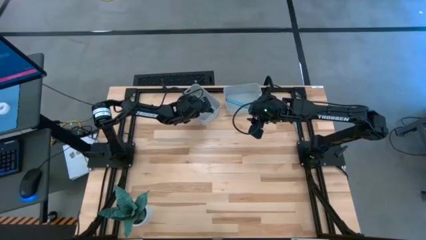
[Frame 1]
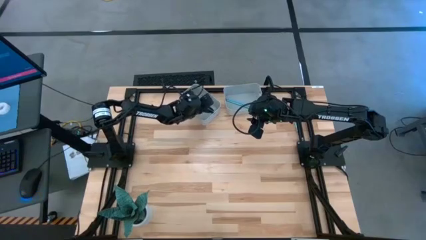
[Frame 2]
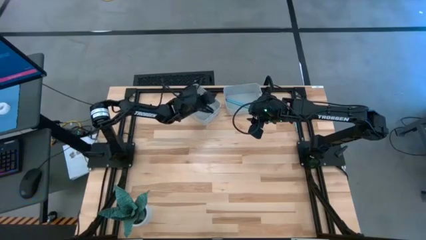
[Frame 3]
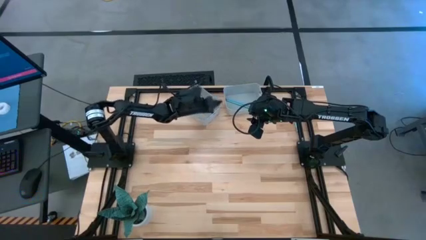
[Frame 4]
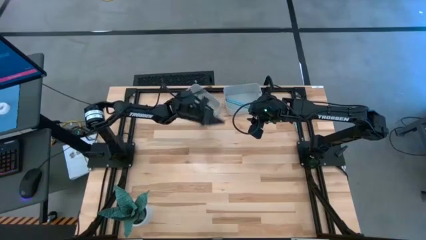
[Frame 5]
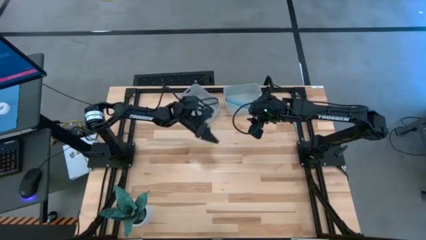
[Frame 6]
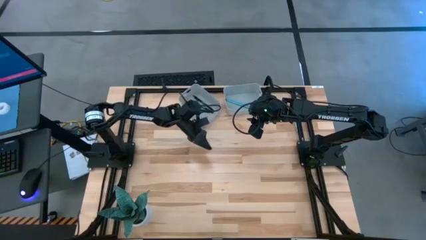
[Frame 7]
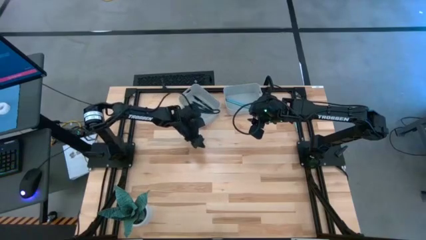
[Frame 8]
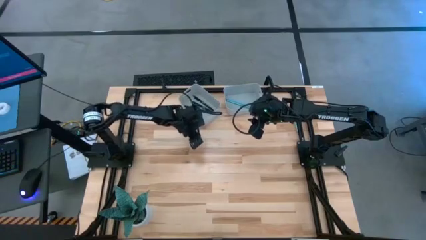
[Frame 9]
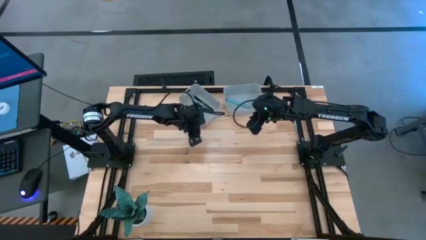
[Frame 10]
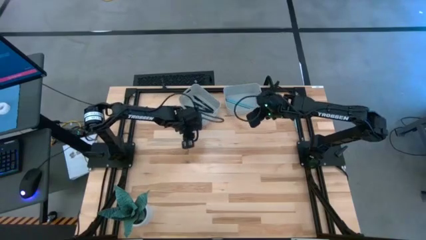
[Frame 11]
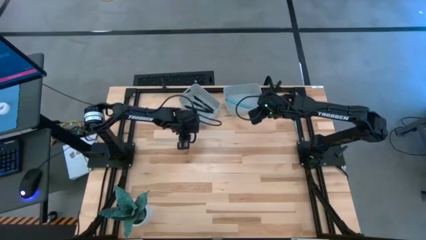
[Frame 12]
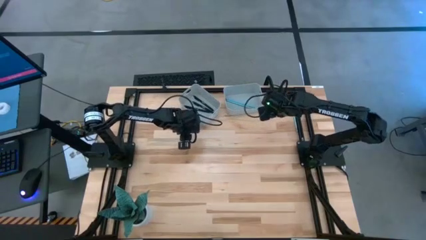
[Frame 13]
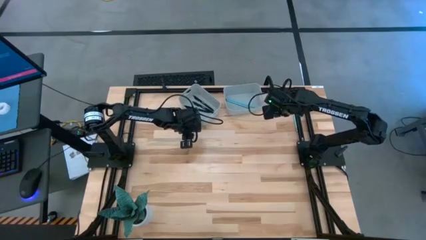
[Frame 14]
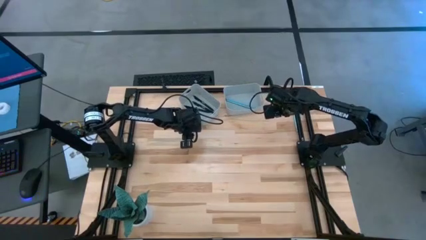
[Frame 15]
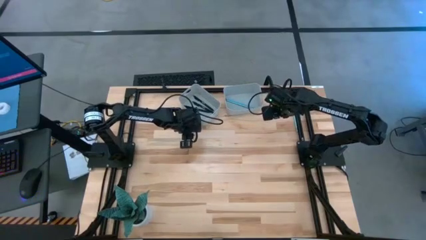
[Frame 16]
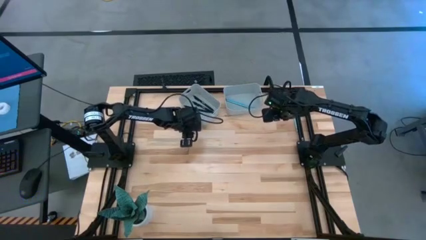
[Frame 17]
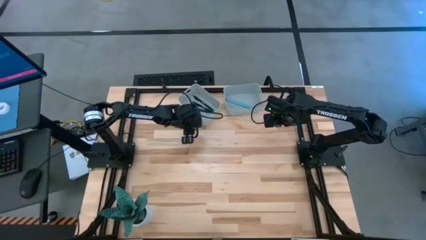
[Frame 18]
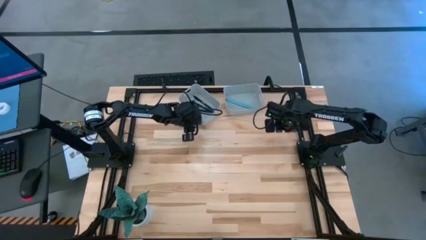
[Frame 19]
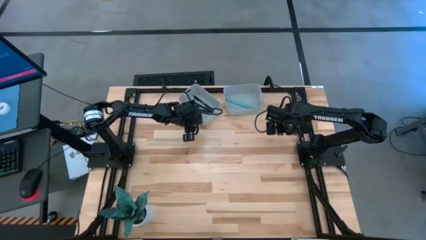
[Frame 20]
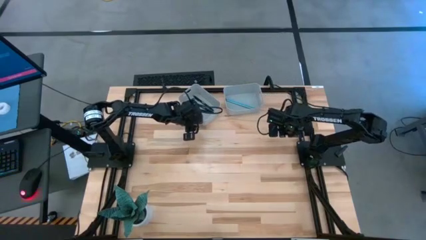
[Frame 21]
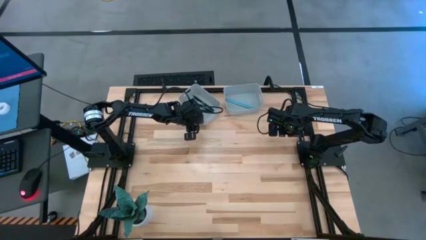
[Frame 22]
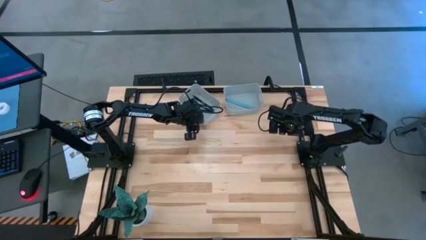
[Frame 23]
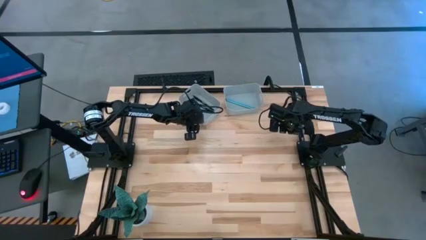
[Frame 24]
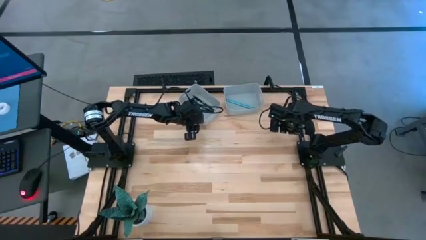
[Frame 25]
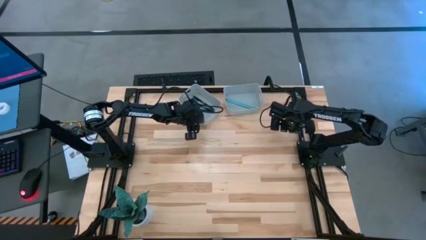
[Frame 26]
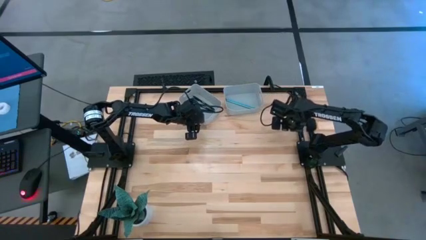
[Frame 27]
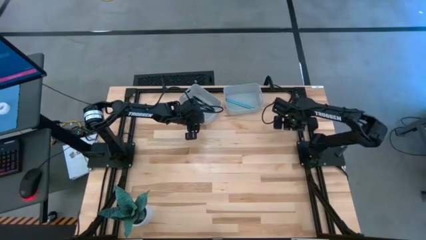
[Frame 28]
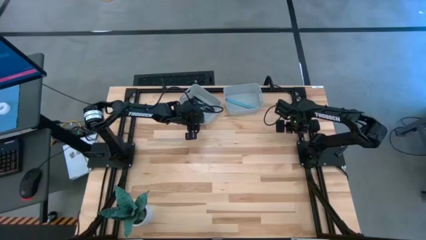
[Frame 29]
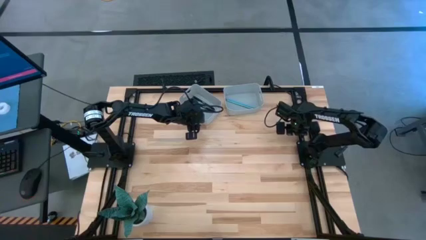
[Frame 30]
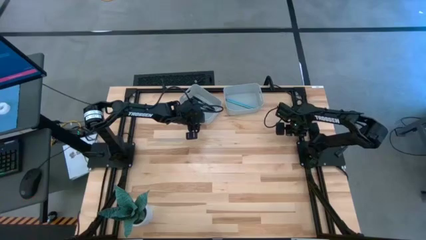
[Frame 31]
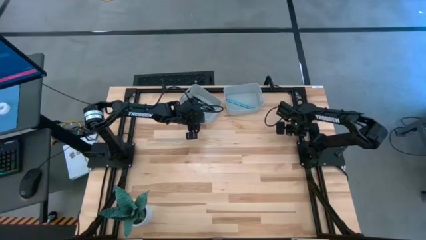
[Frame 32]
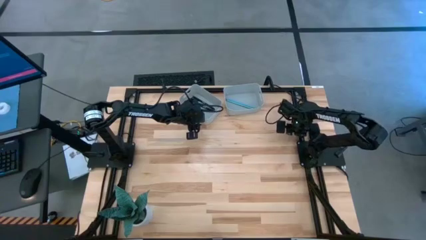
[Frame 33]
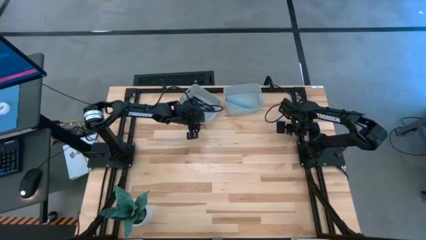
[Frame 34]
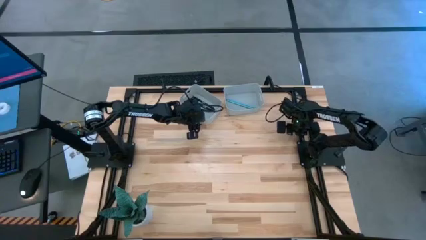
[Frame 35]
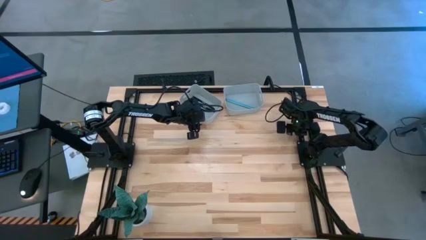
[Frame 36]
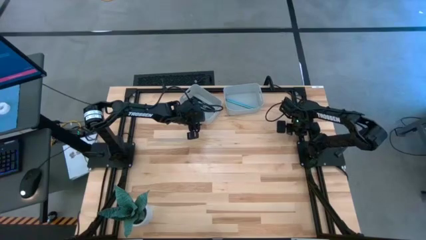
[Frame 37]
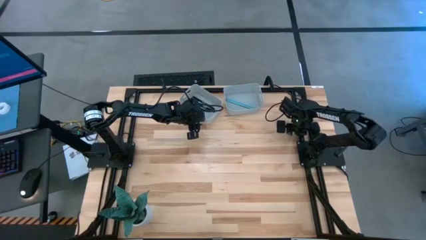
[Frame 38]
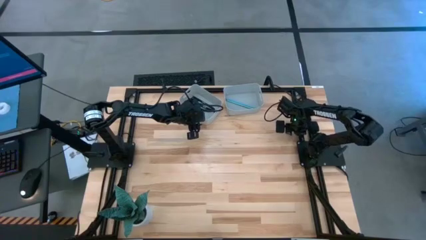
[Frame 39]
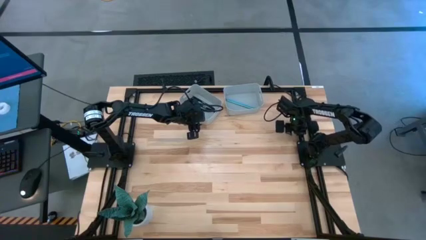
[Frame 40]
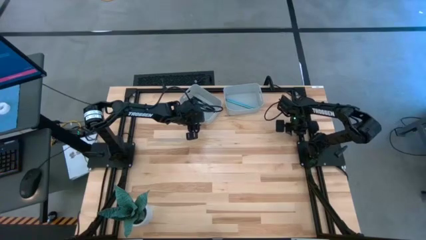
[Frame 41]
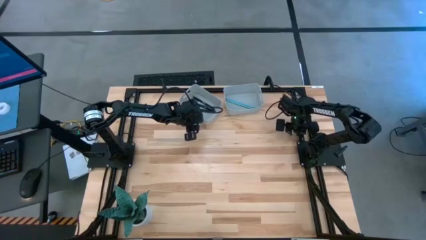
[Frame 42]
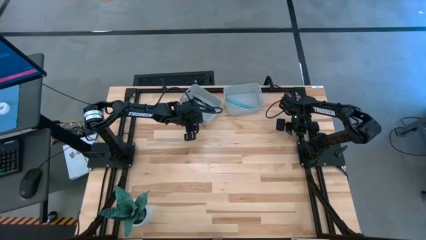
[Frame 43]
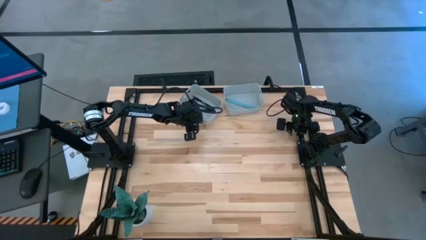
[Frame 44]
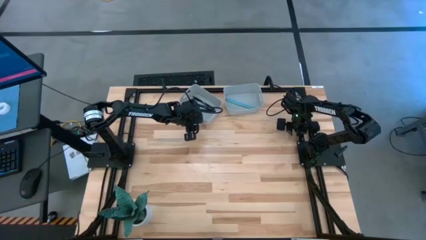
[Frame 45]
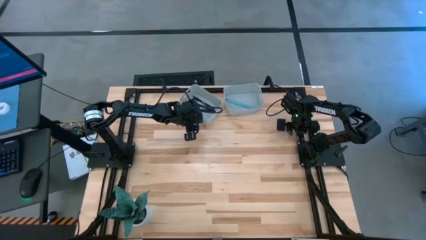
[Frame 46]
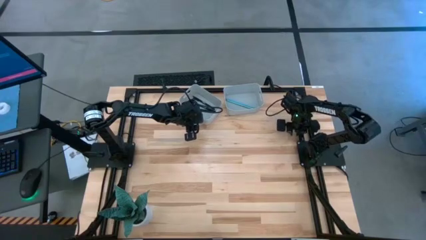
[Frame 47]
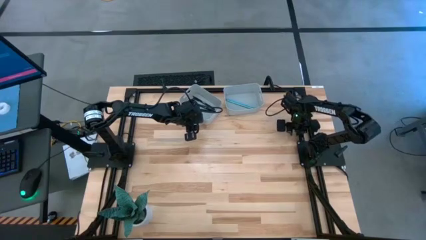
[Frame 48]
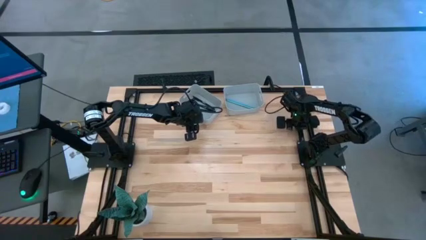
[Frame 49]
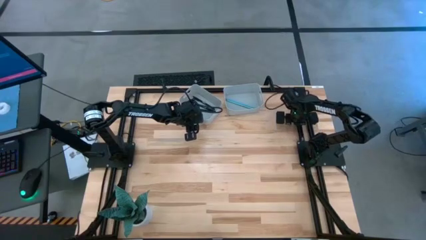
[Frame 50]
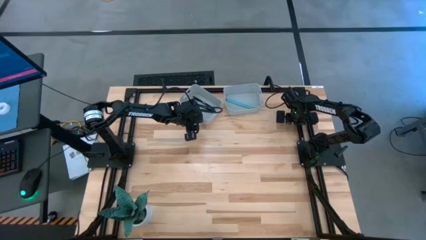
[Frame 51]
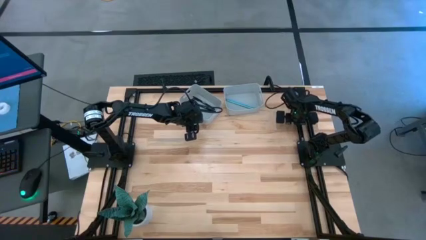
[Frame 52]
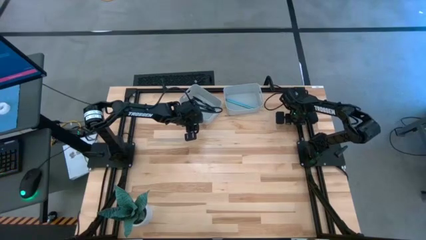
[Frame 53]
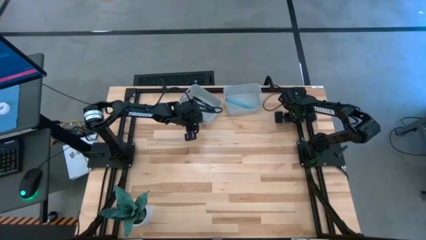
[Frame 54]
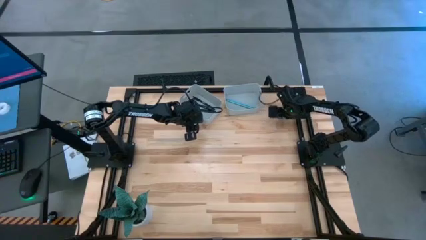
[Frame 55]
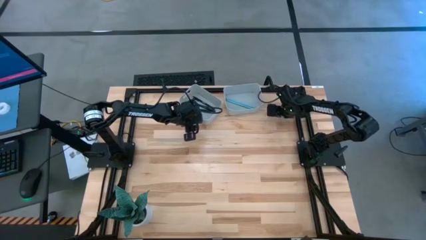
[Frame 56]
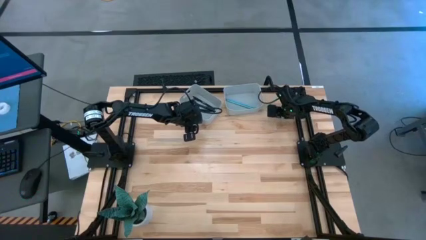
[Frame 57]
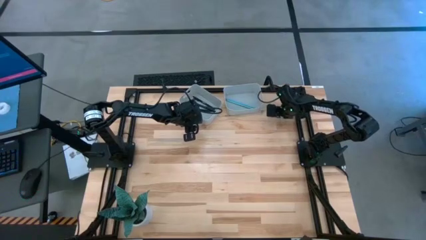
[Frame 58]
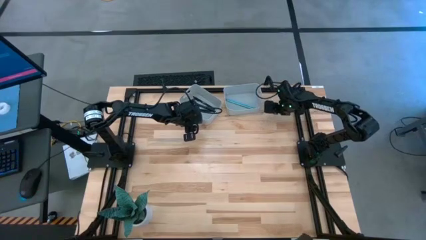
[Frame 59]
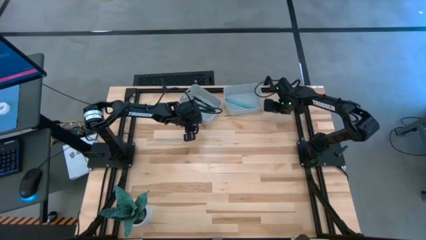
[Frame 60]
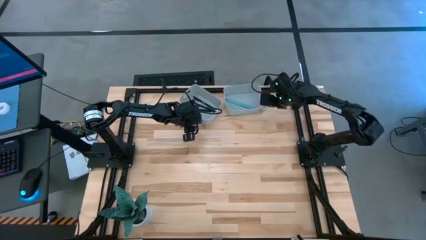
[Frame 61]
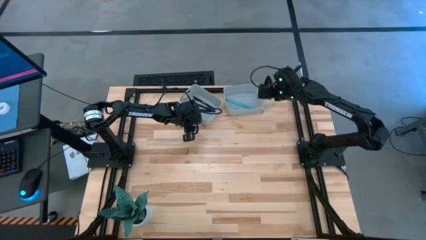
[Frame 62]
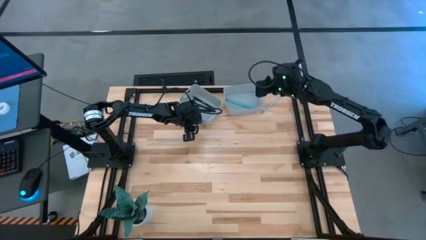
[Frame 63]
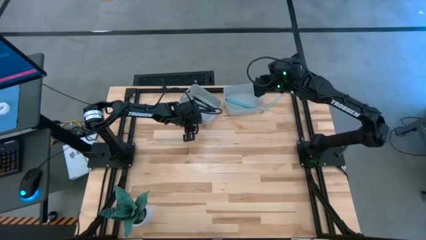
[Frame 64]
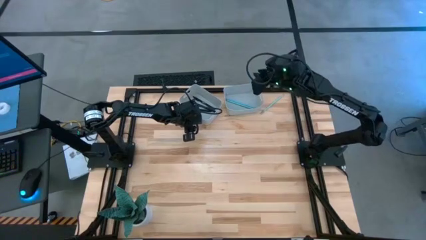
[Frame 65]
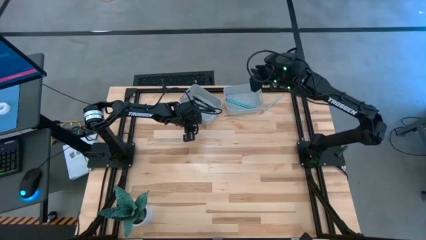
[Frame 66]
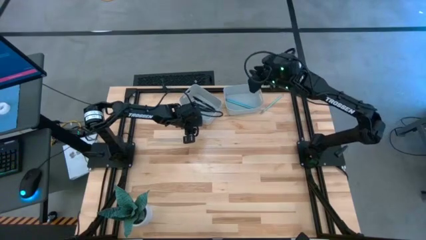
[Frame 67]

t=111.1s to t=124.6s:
Task: Sort pens & pencils
Put the light green pencil into the right gray bin

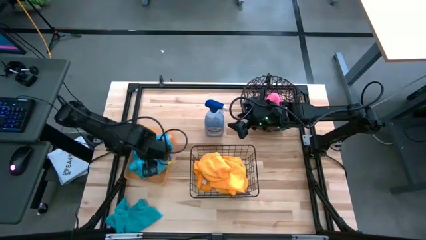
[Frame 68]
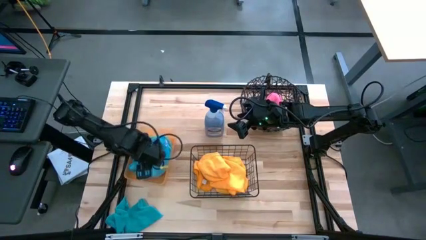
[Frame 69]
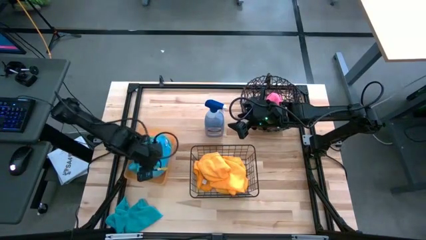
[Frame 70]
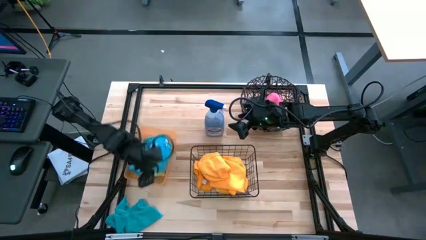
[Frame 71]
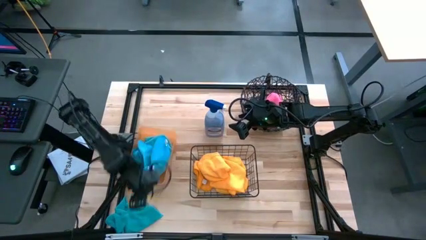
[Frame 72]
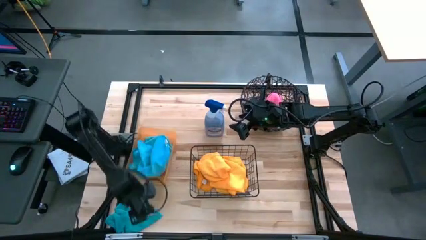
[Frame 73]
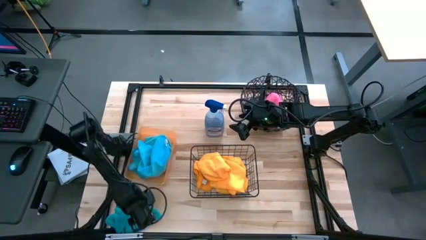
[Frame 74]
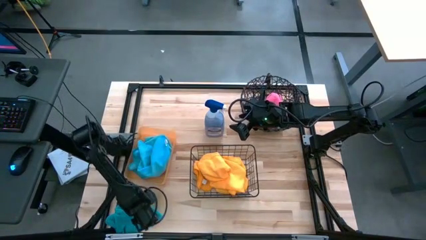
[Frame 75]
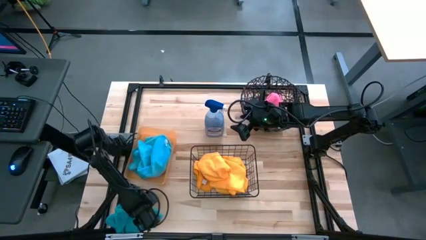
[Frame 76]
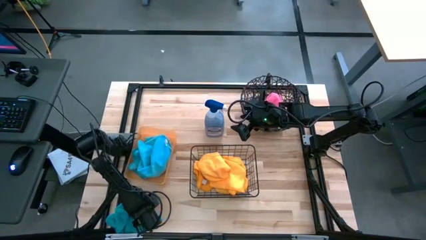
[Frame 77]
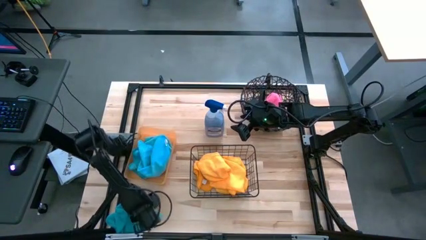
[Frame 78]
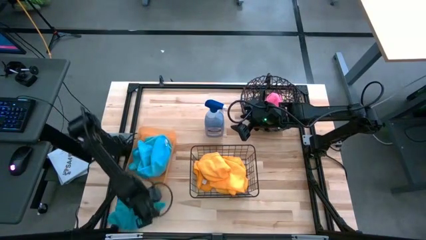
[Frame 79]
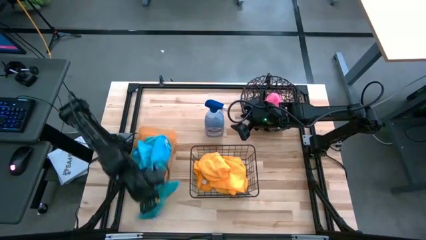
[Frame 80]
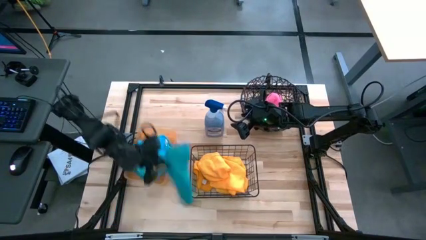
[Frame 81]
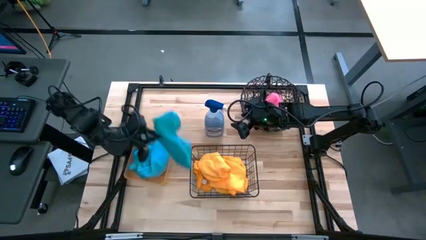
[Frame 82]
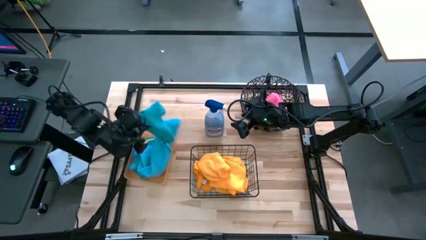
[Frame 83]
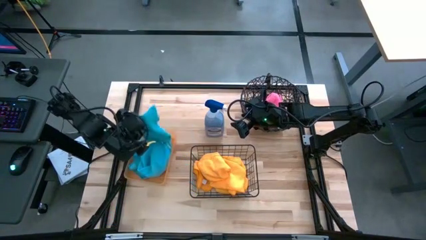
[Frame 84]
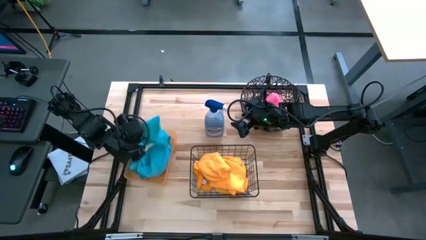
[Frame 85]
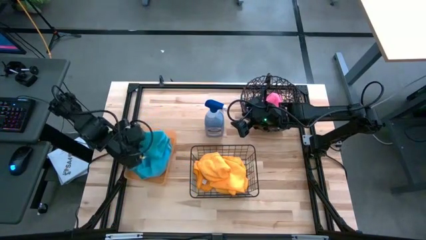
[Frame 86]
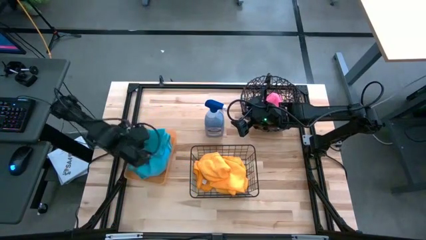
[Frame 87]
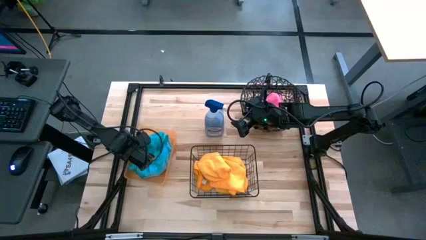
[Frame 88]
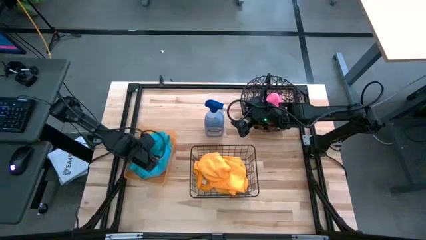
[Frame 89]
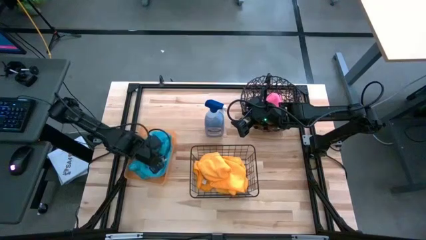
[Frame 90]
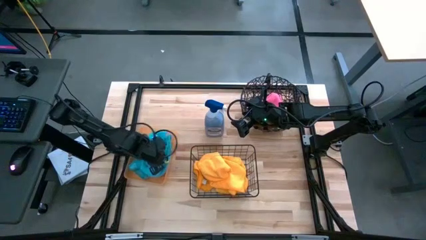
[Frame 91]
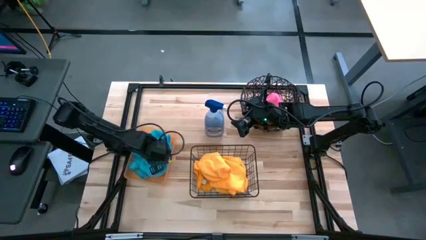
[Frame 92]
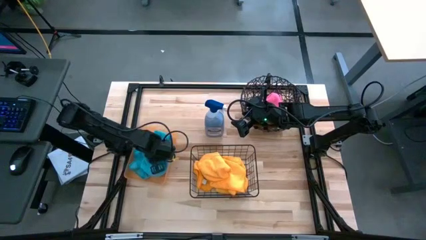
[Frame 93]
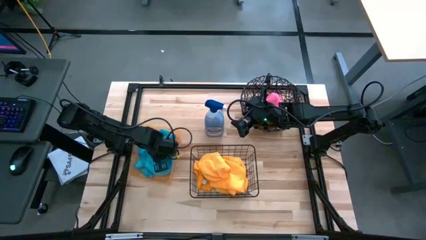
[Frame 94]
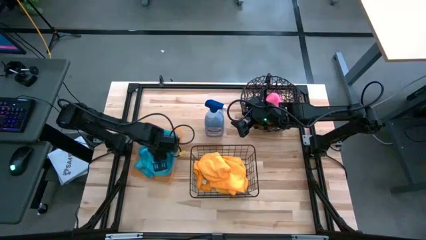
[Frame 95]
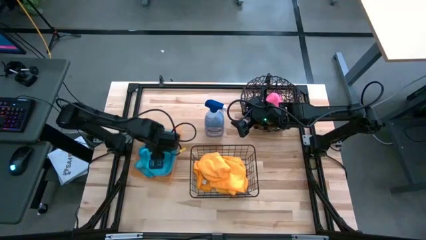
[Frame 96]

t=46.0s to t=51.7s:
Task: Sort microfiber towel by color & place in baskets
Put the blue microfiber towel into the orange bin
